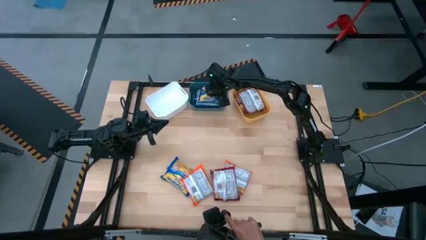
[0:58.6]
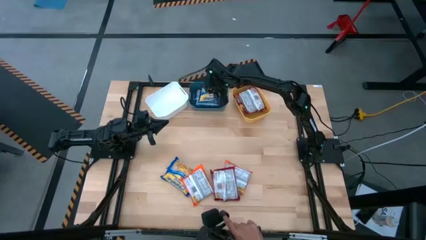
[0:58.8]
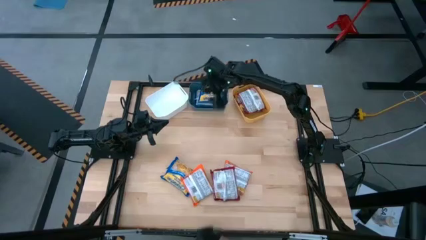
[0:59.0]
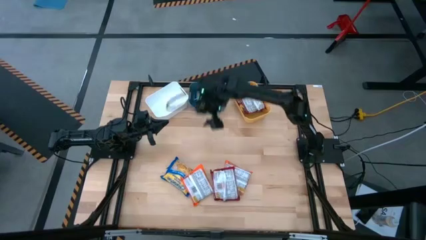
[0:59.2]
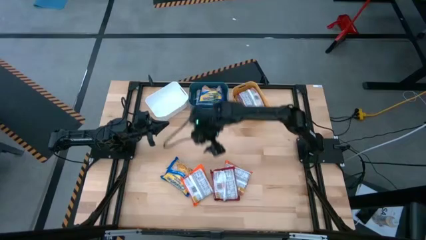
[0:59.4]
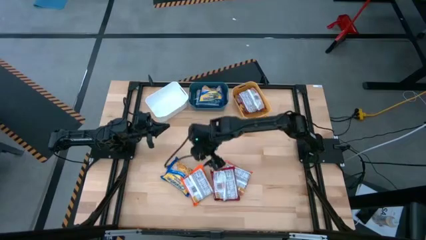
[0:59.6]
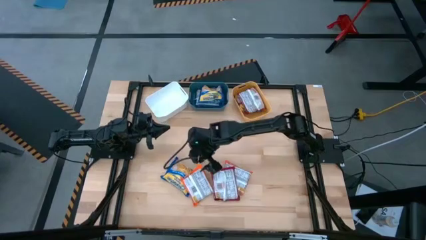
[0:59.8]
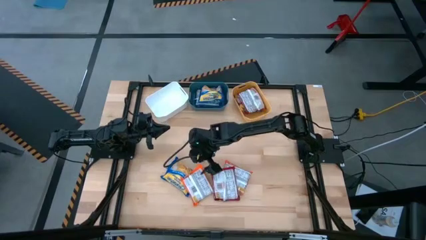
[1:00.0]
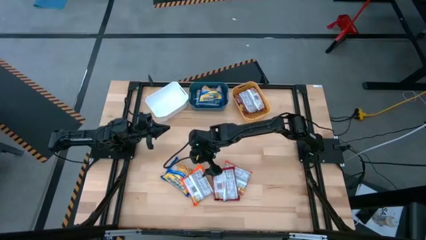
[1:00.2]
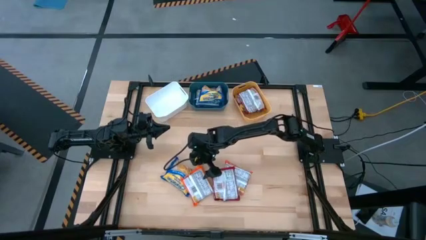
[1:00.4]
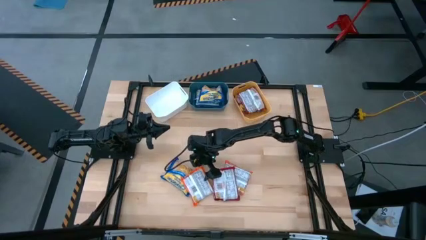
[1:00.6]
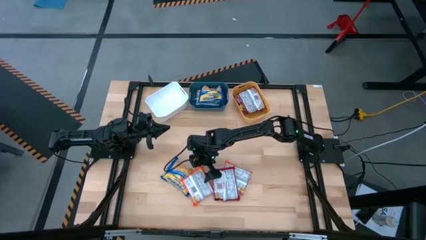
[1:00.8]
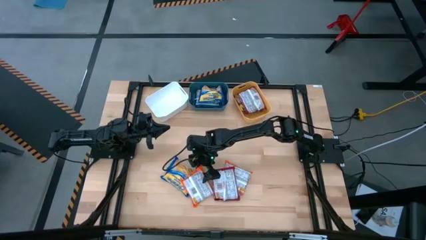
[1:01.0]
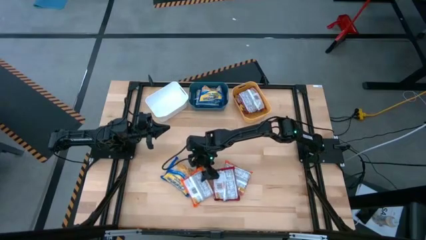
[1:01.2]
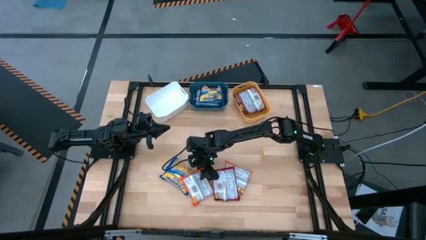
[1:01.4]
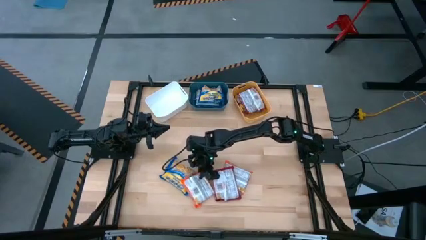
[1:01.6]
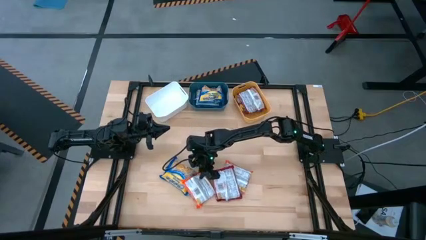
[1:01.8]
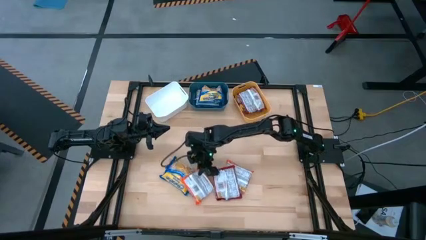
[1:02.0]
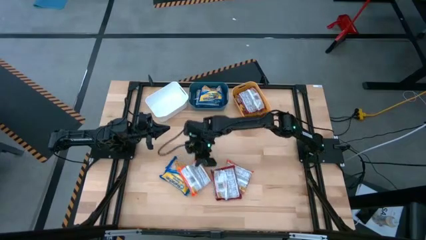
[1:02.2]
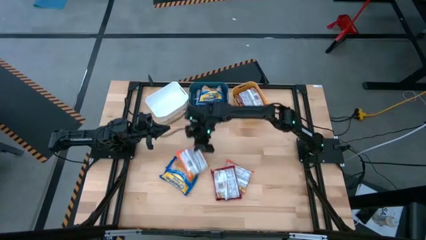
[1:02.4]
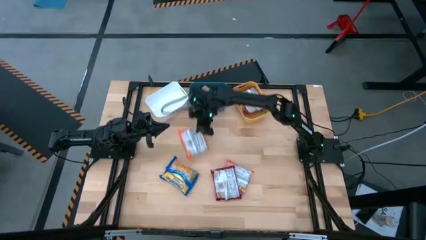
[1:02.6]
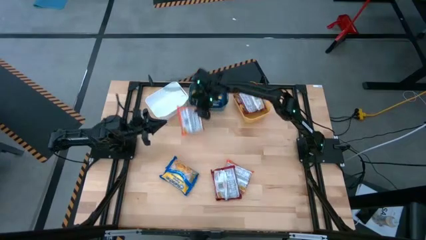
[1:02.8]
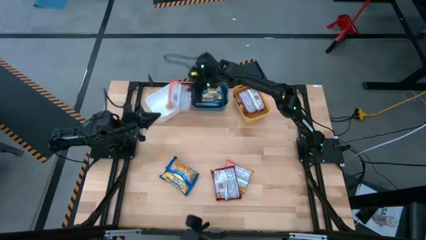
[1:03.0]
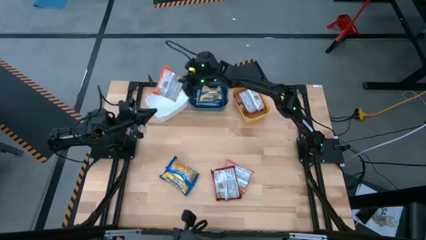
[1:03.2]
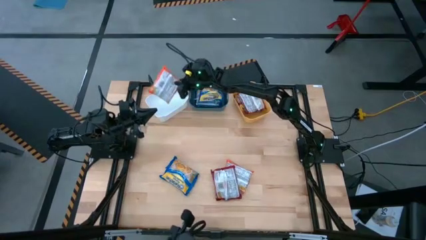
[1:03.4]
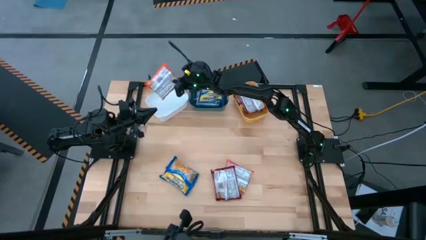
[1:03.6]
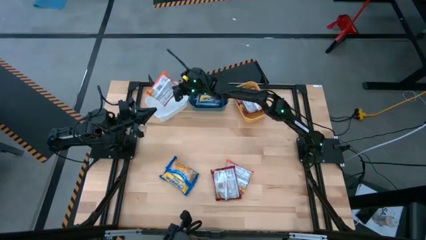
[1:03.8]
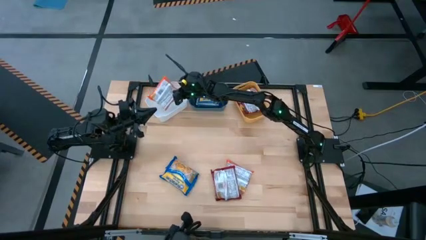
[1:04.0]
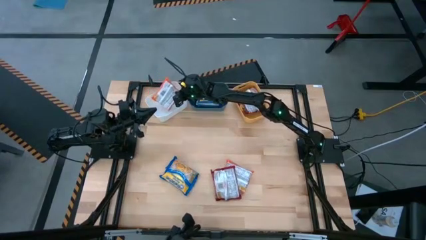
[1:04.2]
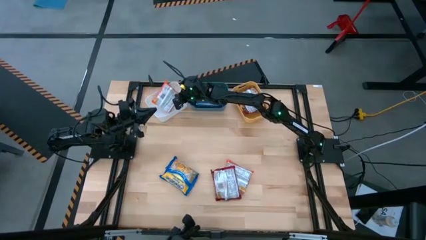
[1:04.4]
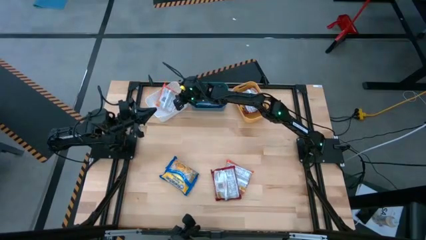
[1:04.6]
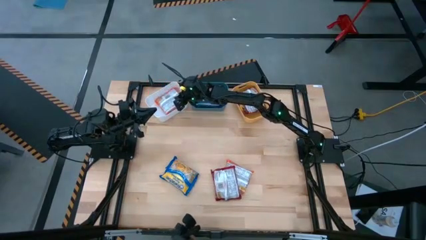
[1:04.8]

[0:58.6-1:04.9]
Task: Sort Maruchan noodles
Put the left orange noodle pack into the white bin

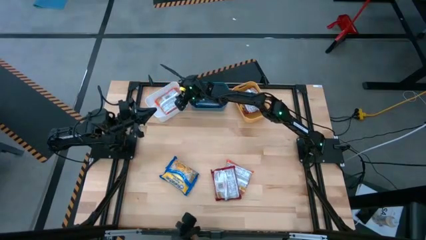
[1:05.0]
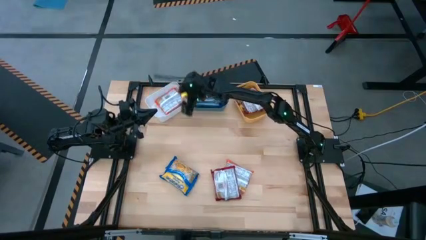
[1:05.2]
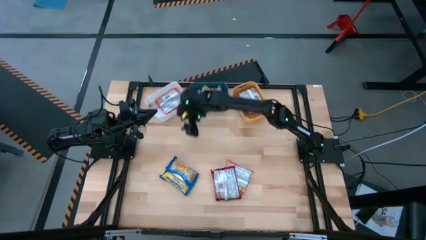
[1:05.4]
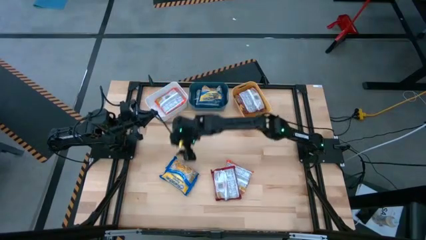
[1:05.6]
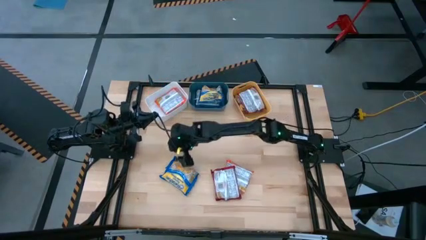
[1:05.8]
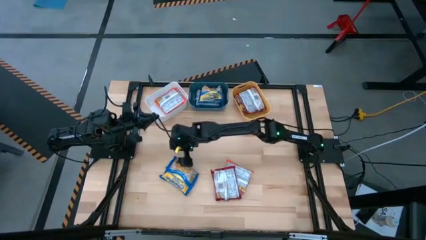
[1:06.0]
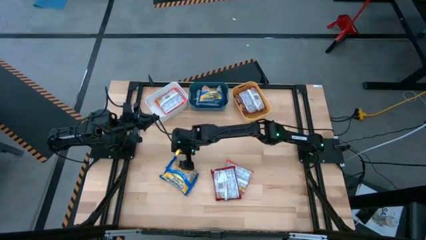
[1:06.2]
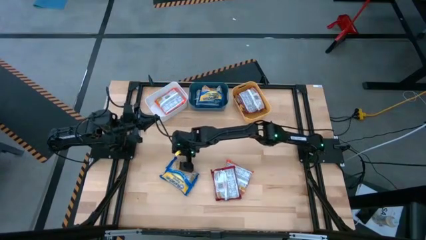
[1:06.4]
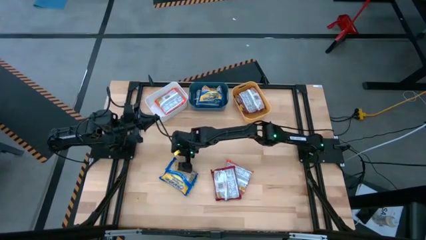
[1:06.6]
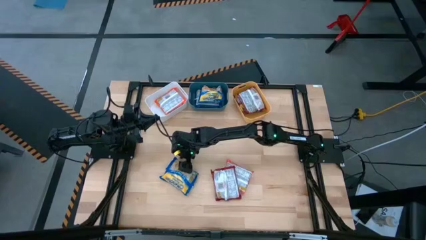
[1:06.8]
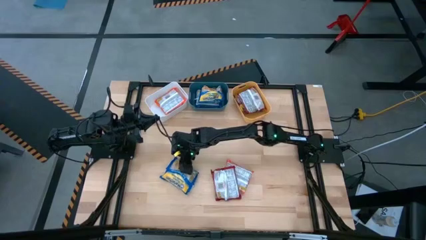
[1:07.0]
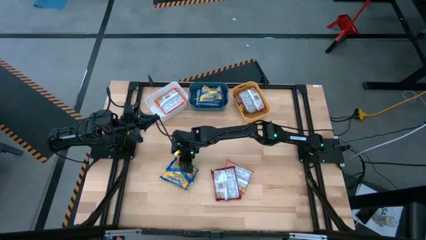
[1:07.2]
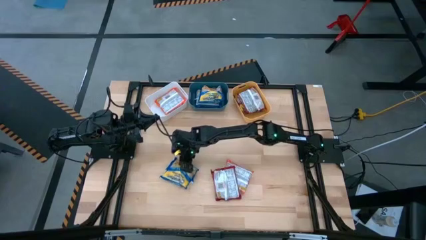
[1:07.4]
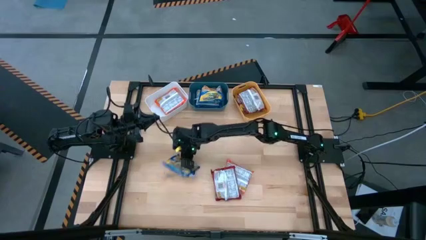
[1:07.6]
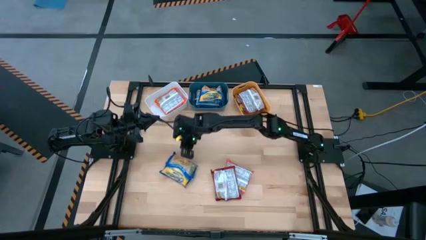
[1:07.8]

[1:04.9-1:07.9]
Put the blue noodle pack into the blue bin

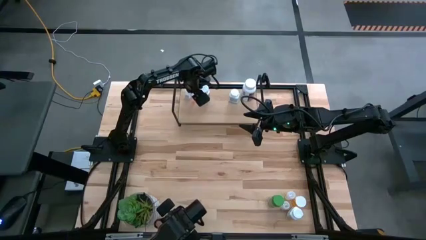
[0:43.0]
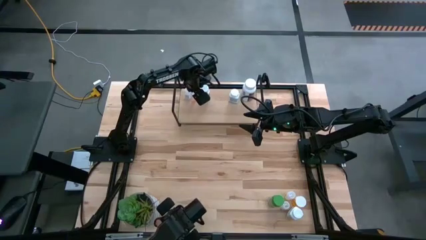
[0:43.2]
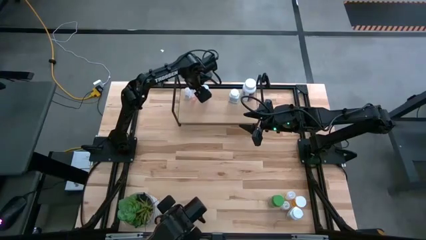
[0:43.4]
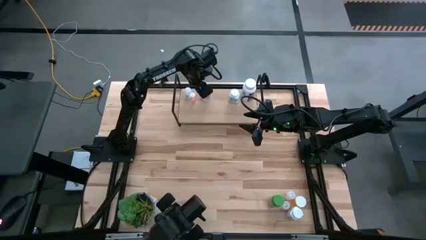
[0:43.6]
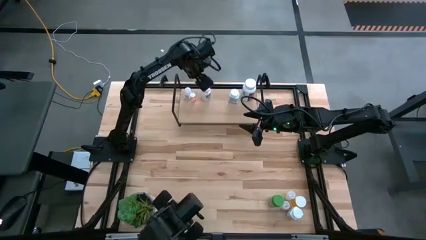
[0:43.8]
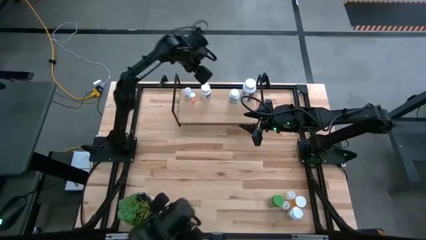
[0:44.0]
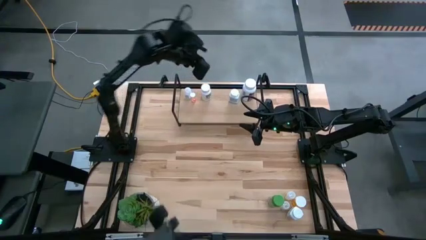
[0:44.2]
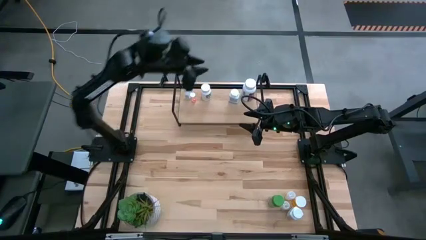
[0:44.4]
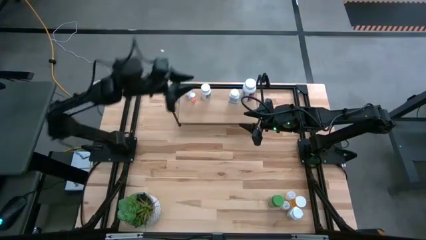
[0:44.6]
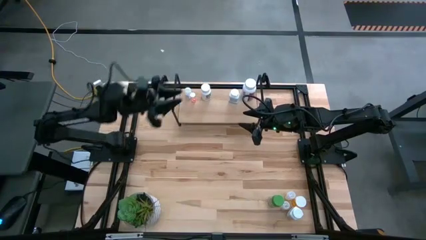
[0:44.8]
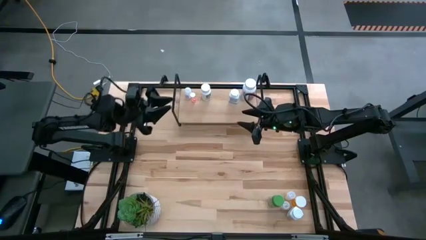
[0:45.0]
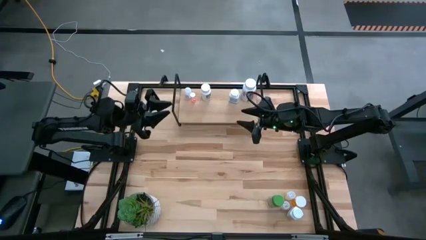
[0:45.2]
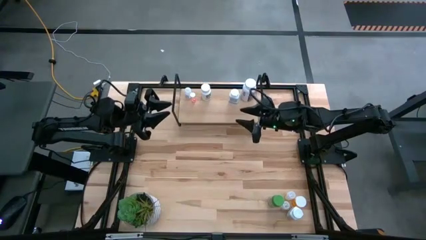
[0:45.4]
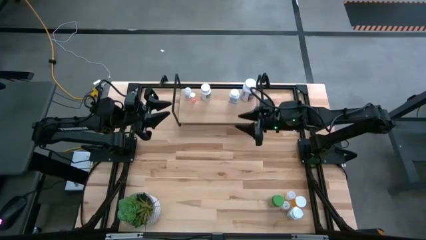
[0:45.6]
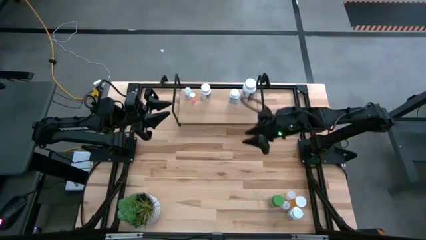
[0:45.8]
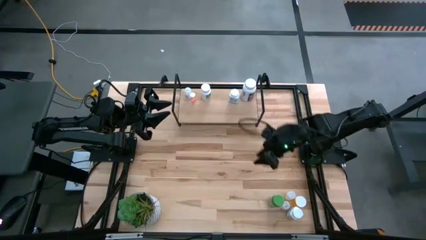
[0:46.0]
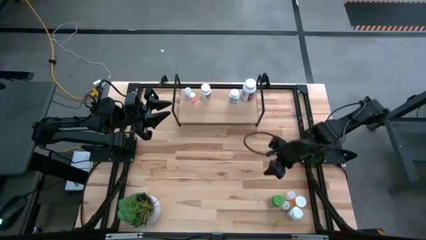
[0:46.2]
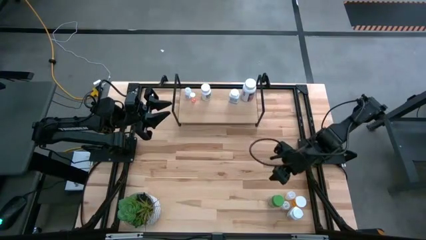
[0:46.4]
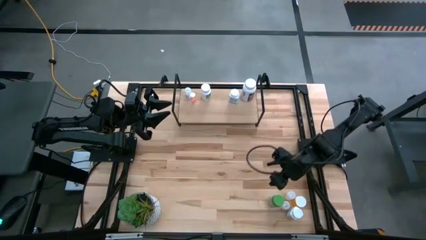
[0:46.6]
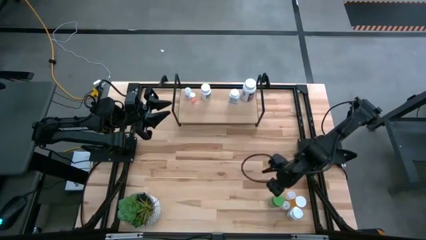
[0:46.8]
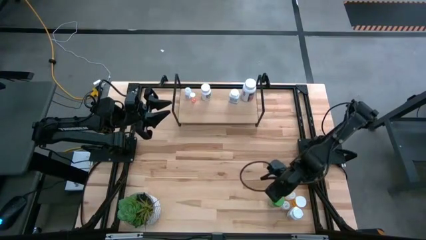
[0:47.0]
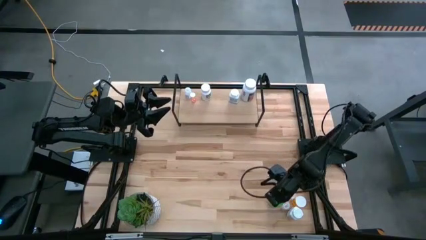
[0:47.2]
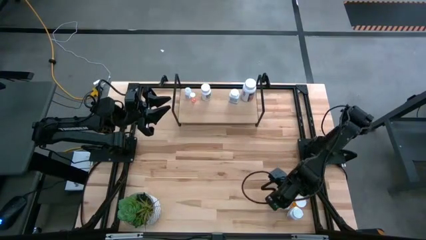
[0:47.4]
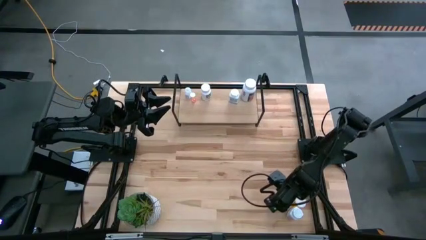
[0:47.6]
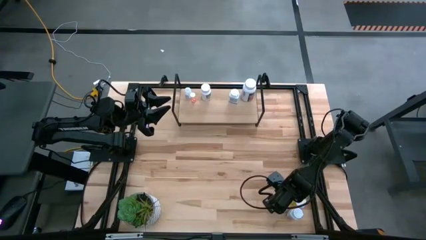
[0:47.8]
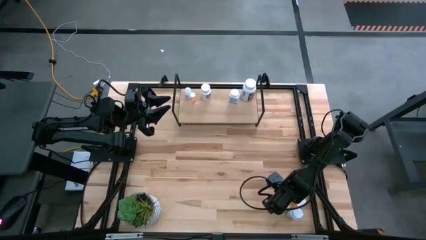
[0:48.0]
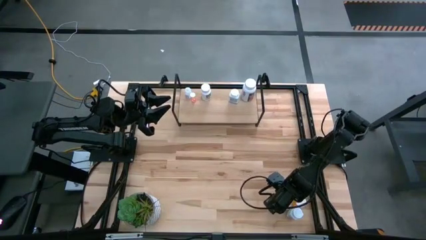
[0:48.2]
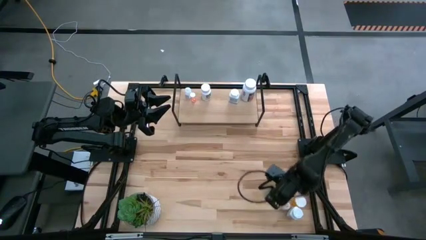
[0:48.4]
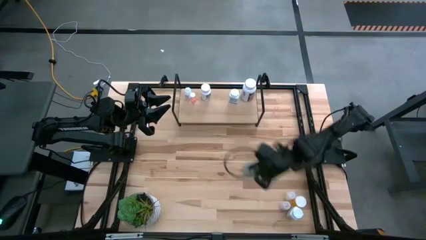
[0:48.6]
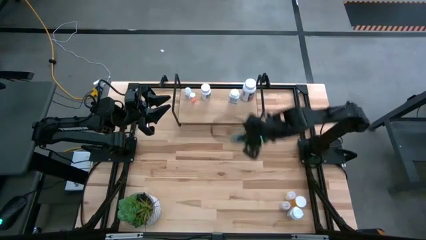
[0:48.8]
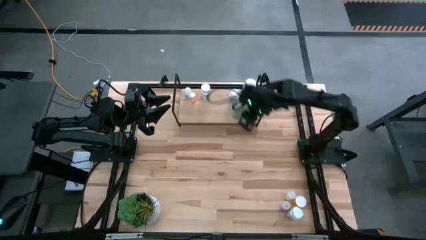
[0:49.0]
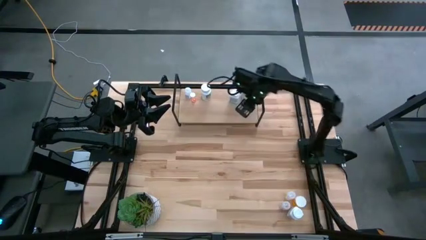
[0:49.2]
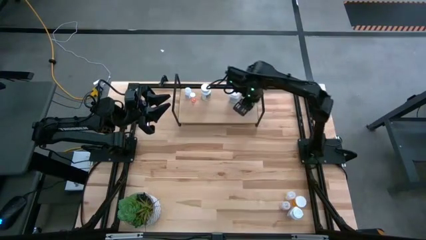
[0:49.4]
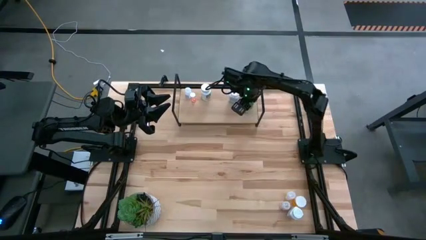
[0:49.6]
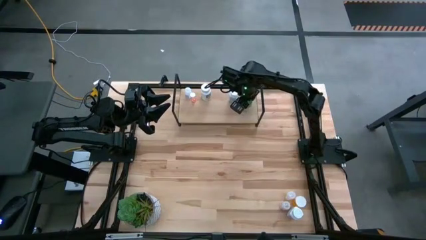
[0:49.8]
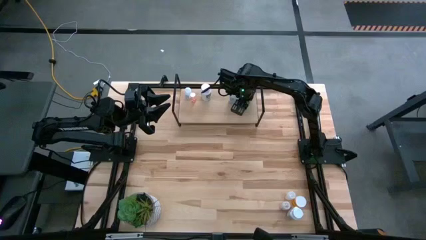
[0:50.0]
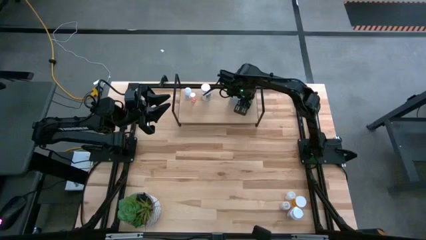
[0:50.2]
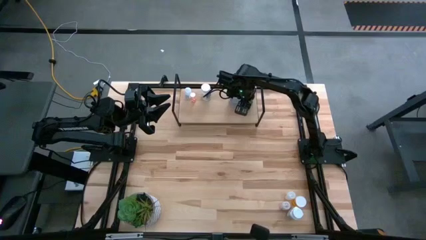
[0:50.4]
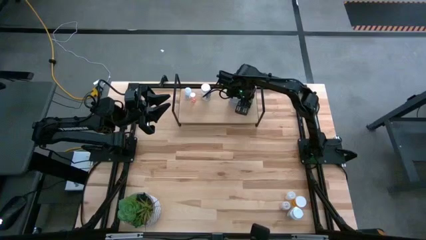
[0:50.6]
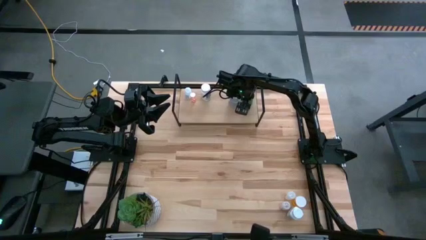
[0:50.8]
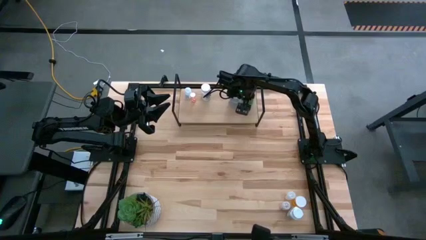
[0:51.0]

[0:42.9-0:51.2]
Task: Pick and place medicine bottles onto shelf by color
Put the green pill bottle on the shelf
